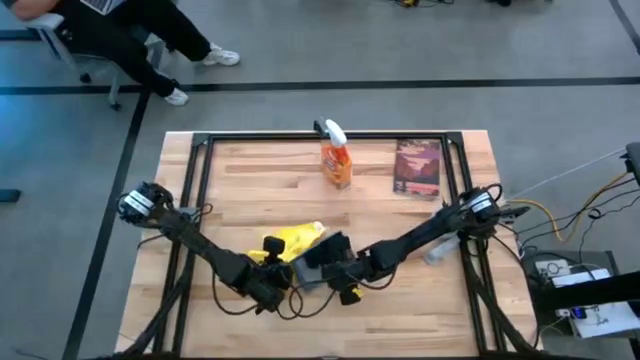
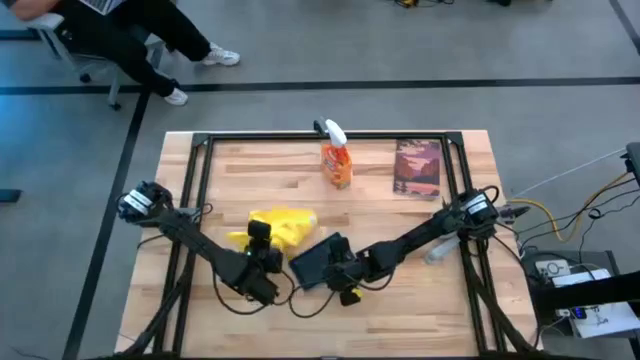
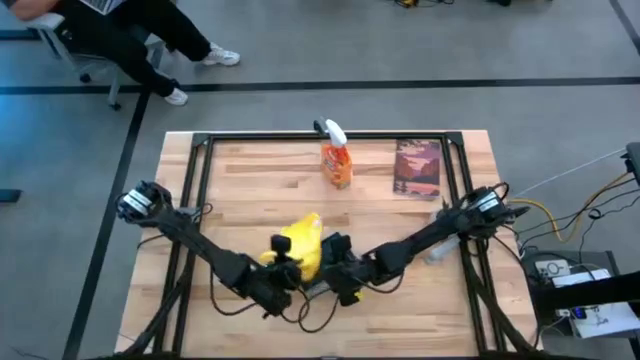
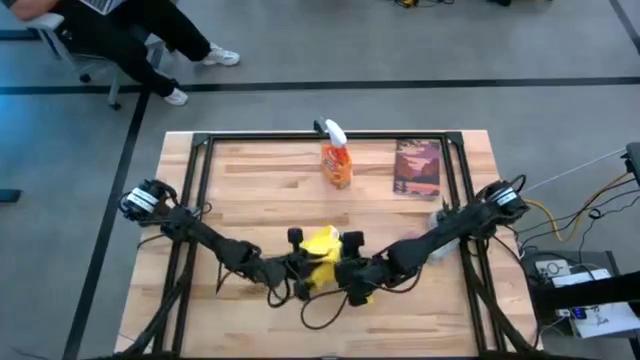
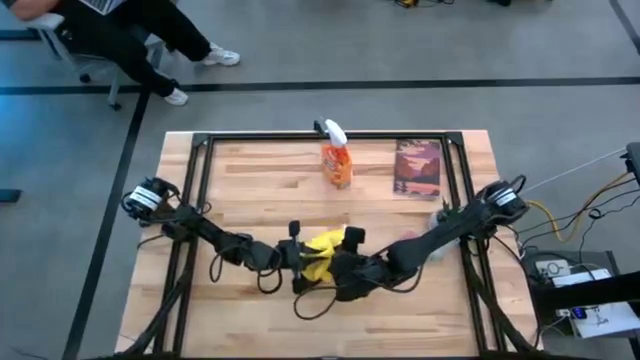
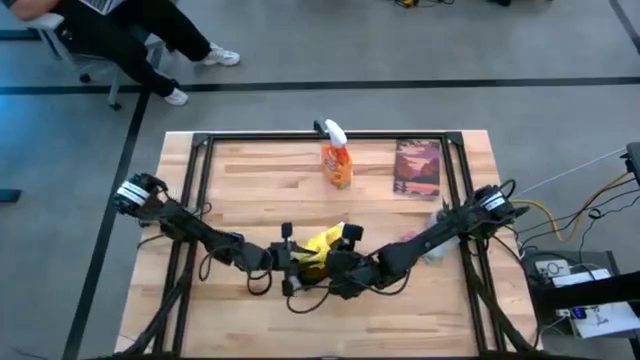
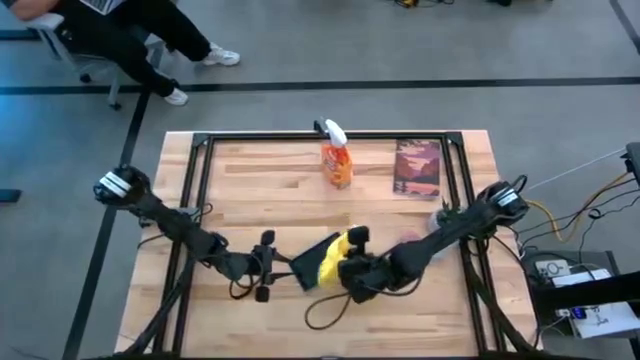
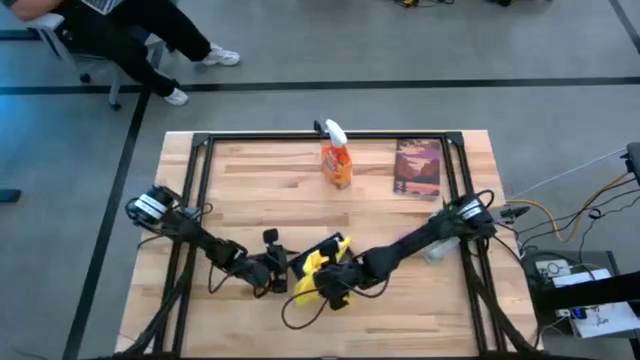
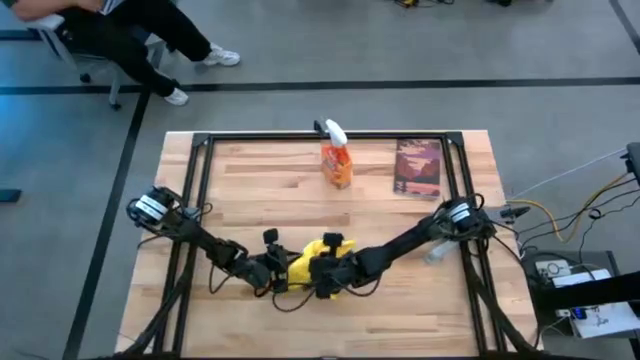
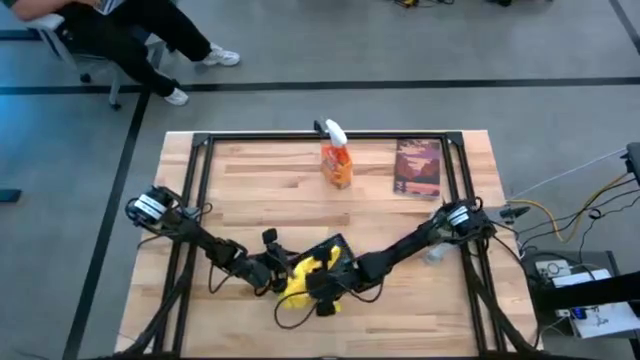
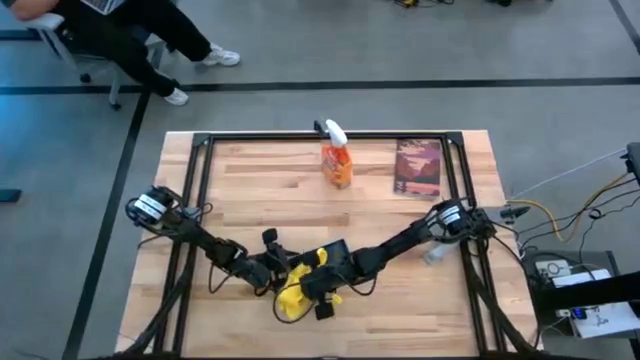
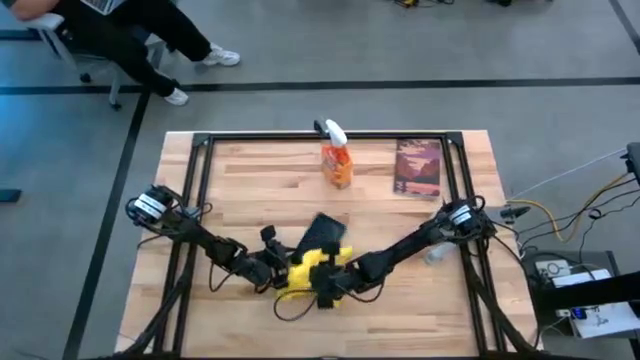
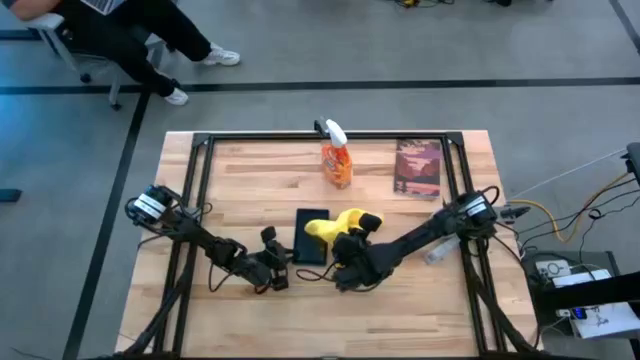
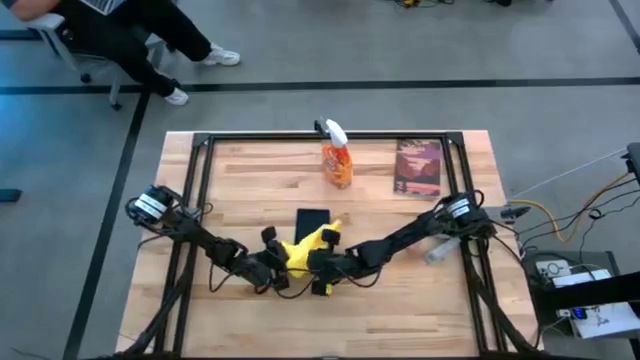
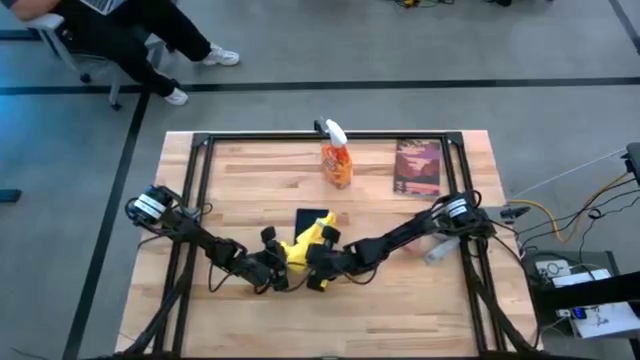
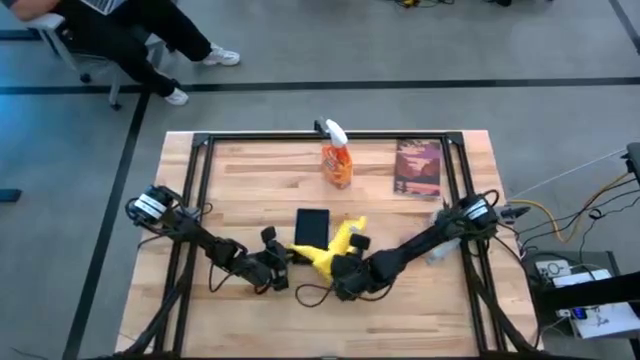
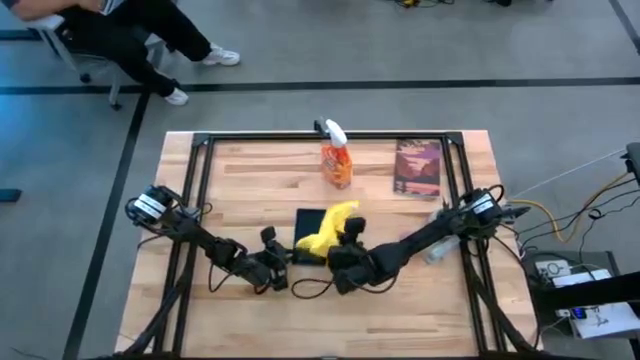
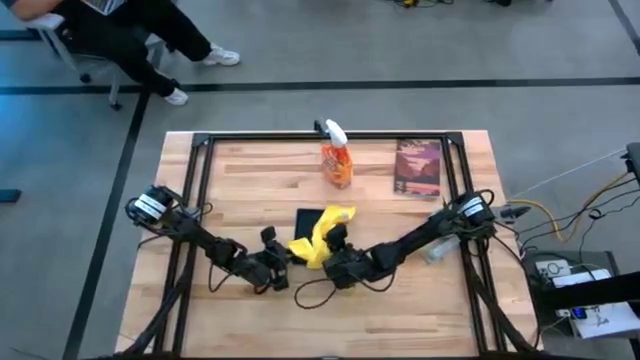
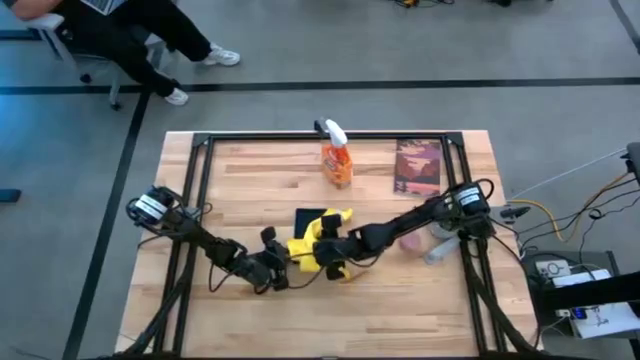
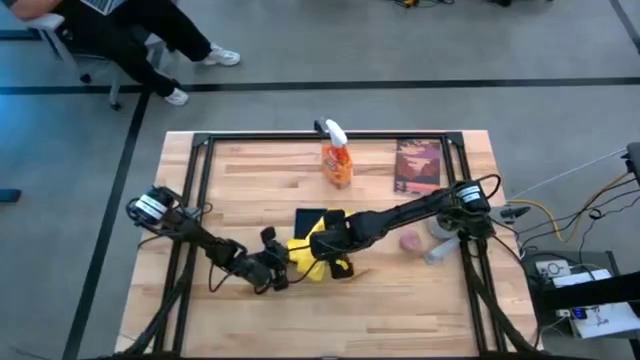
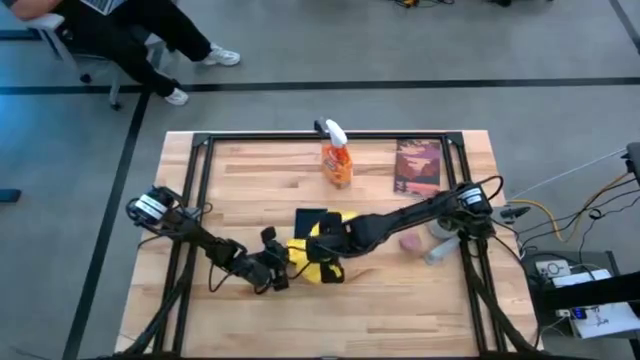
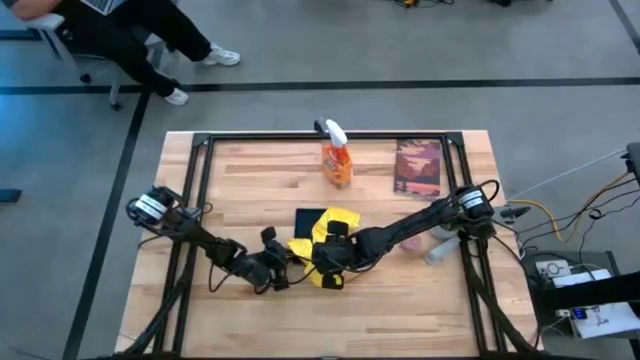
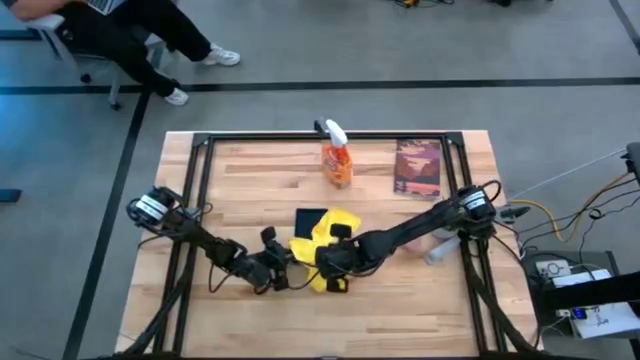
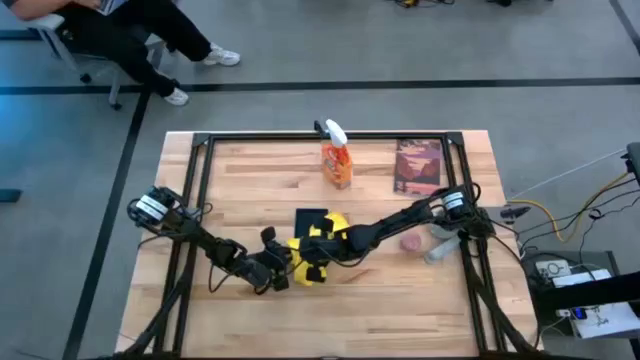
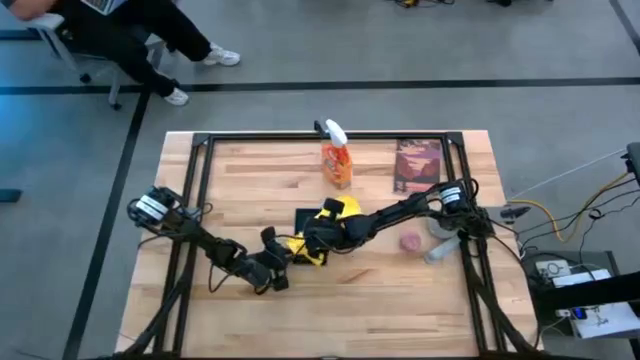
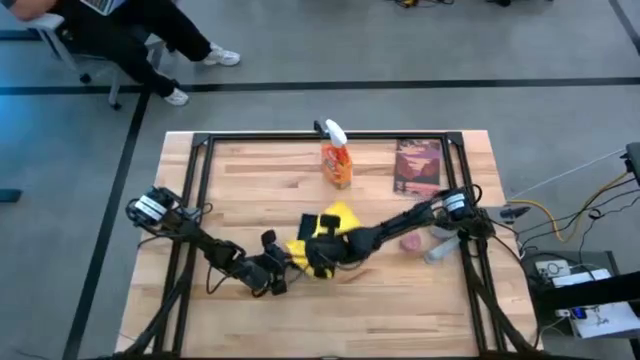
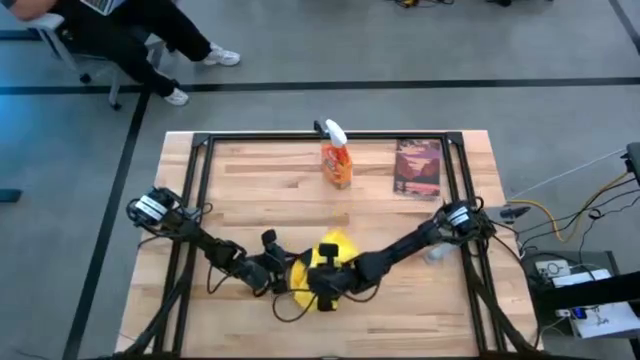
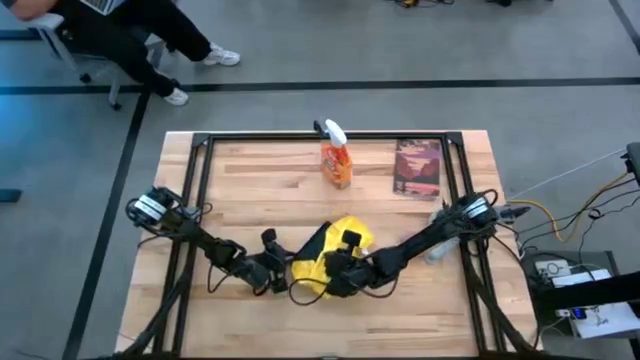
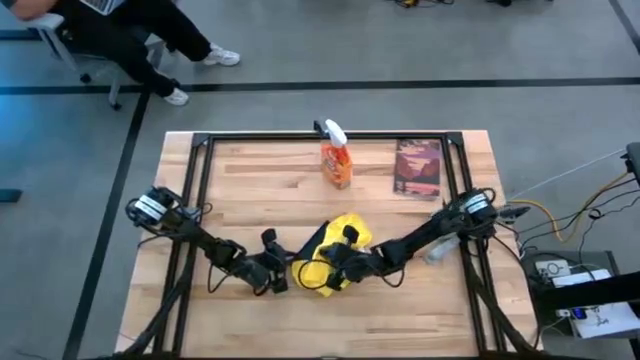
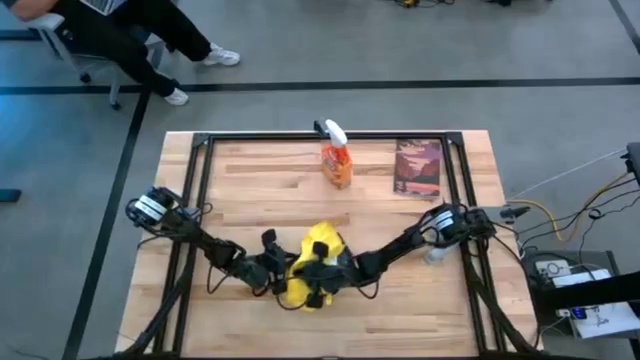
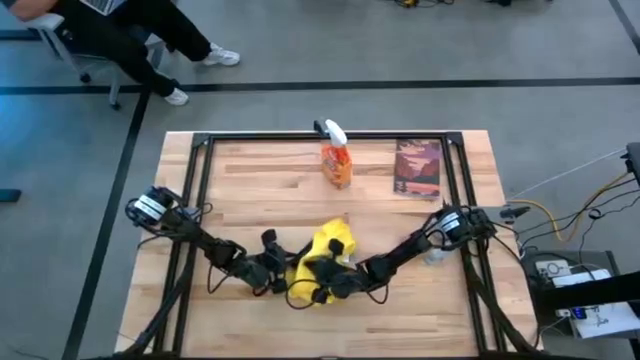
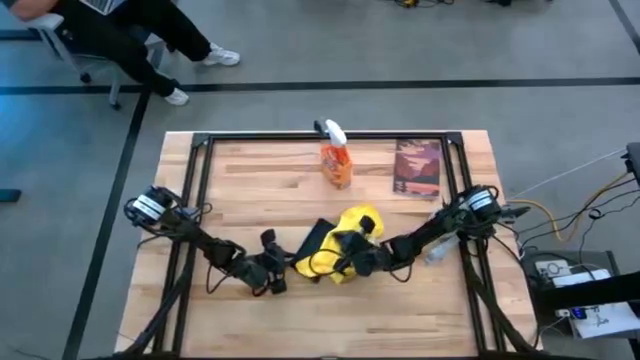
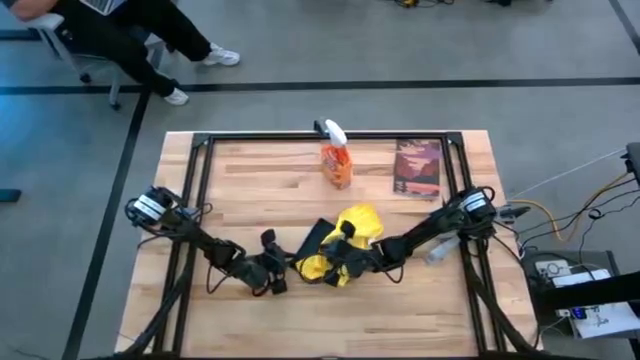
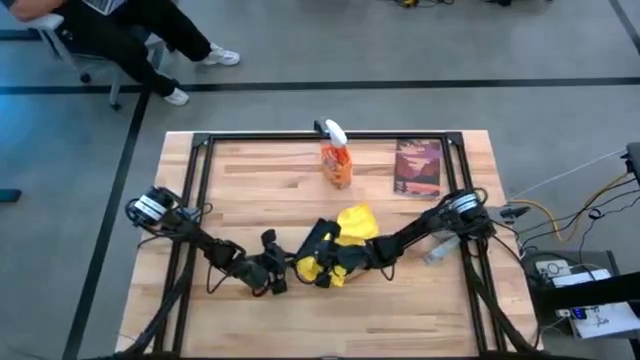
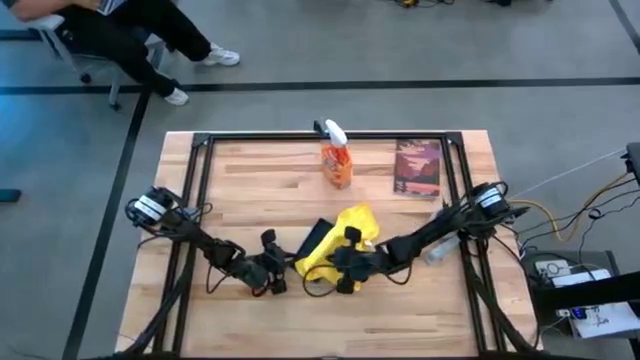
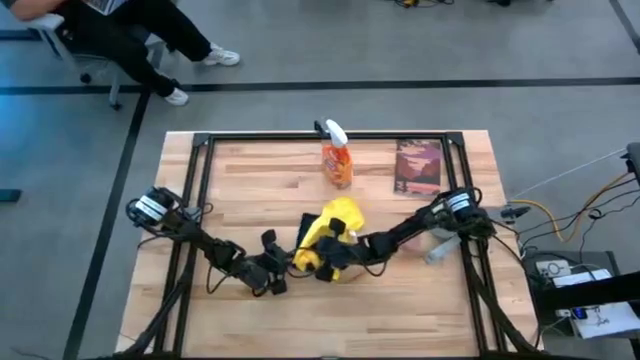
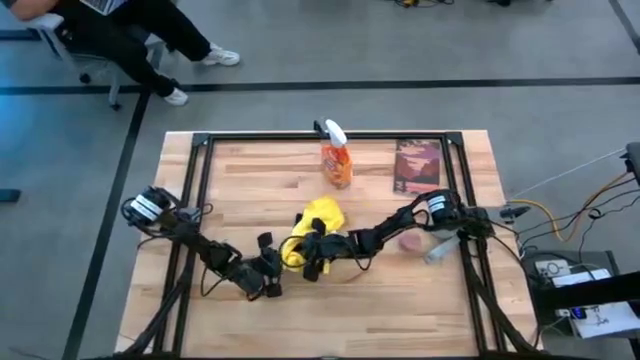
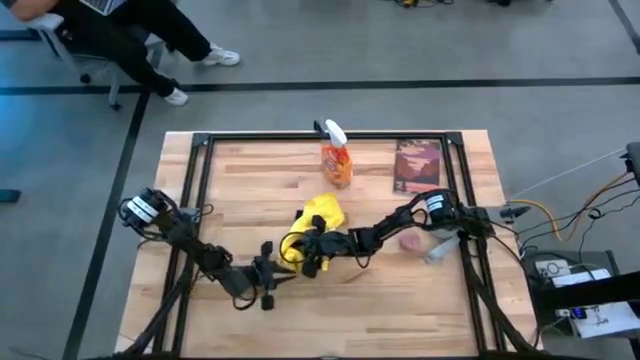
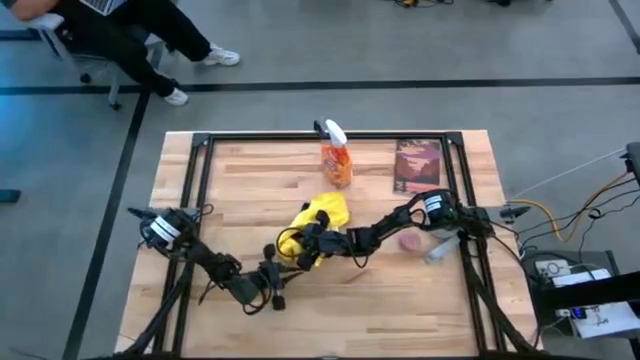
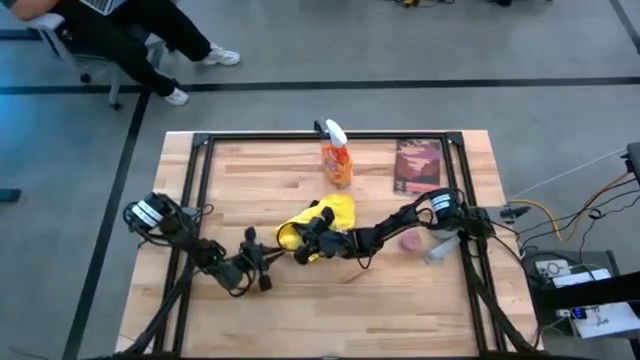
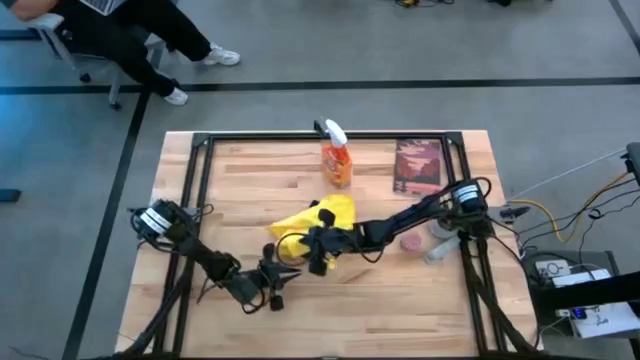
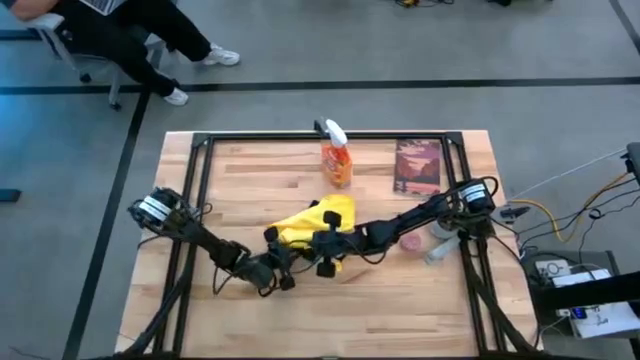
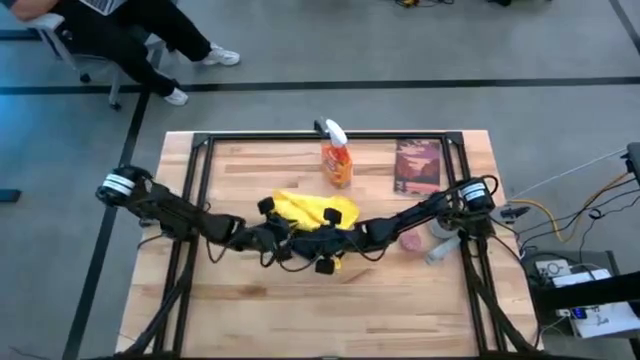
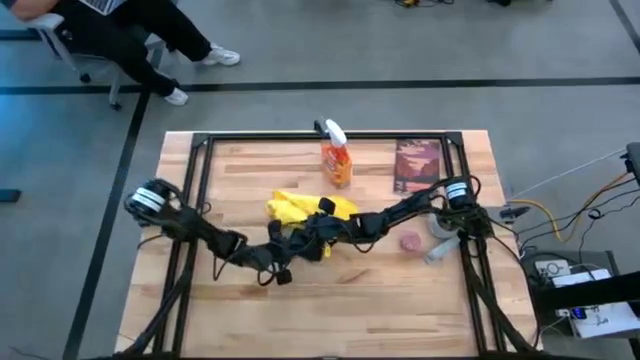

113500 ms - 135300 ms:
Task: Apply microfiber cloth
Wipe the front and back of the tablet with the yellow microfiber cloth
